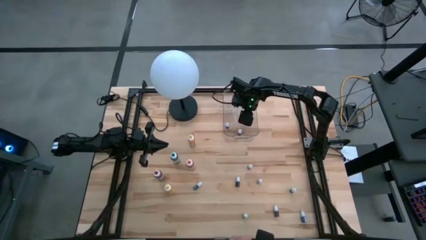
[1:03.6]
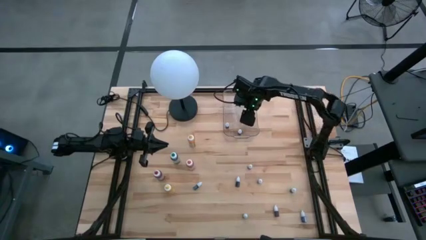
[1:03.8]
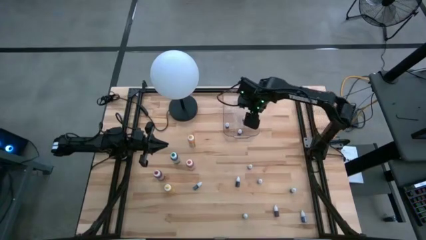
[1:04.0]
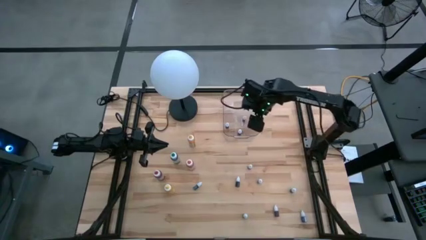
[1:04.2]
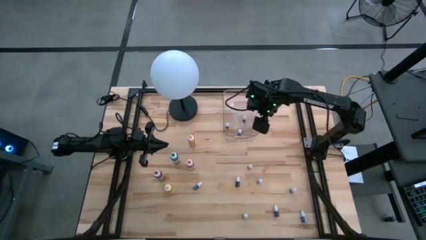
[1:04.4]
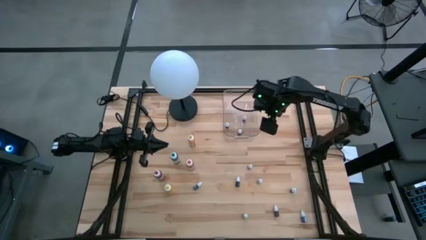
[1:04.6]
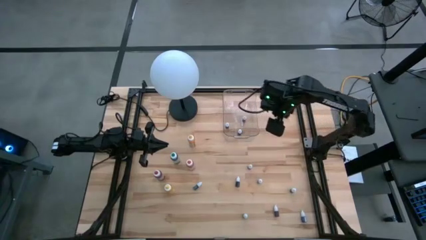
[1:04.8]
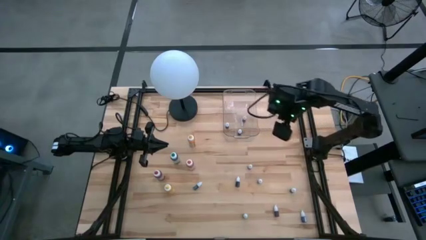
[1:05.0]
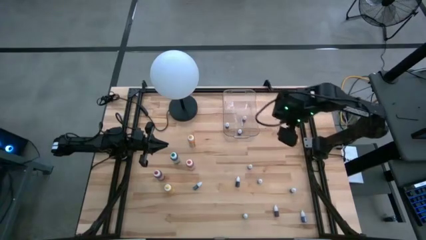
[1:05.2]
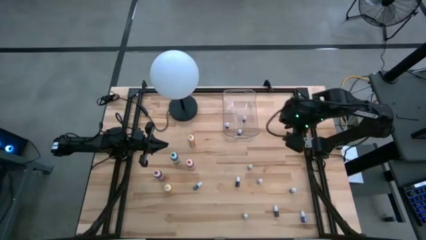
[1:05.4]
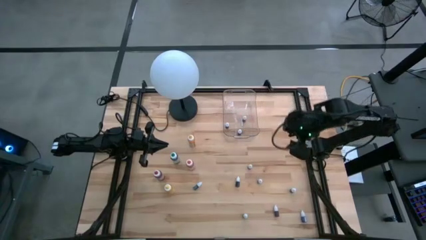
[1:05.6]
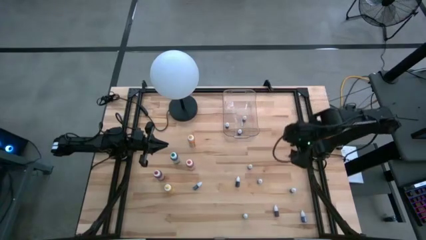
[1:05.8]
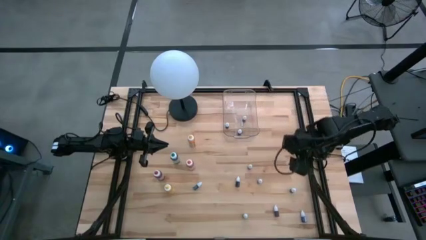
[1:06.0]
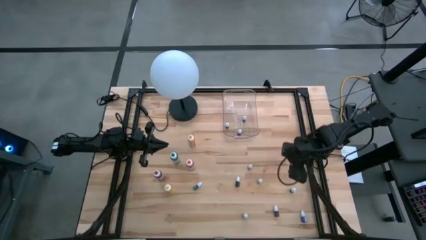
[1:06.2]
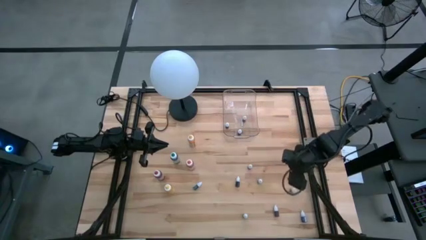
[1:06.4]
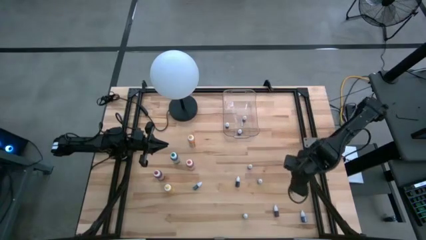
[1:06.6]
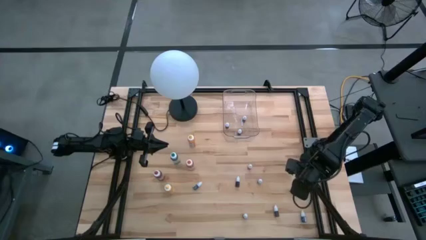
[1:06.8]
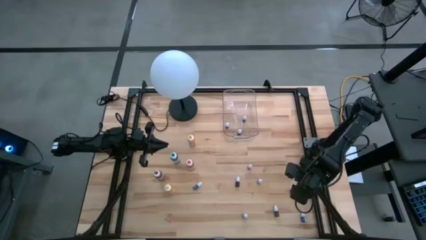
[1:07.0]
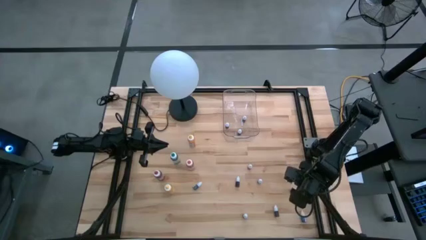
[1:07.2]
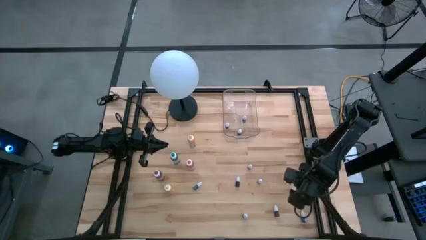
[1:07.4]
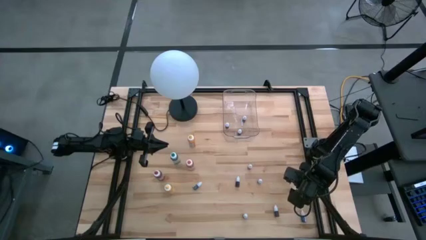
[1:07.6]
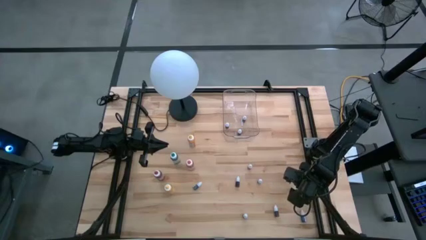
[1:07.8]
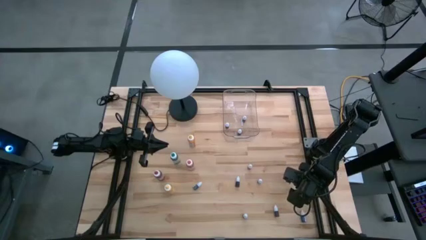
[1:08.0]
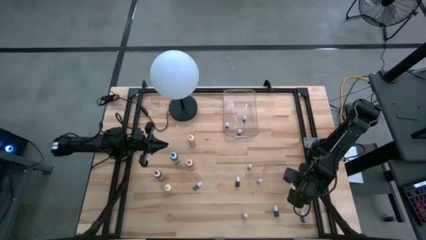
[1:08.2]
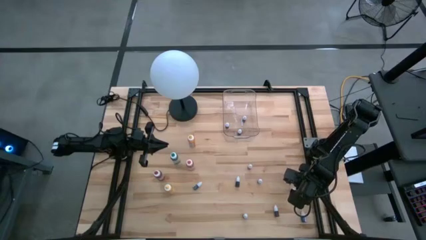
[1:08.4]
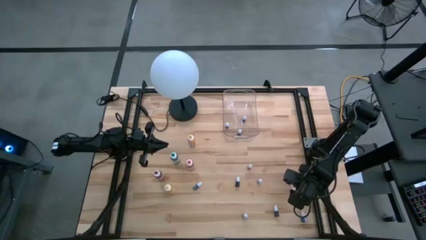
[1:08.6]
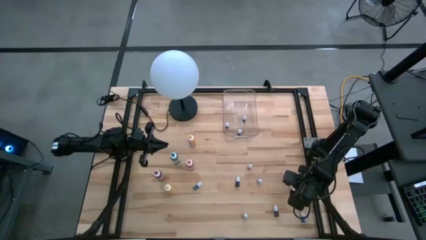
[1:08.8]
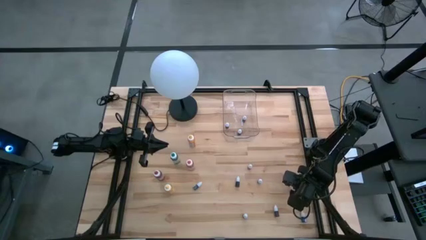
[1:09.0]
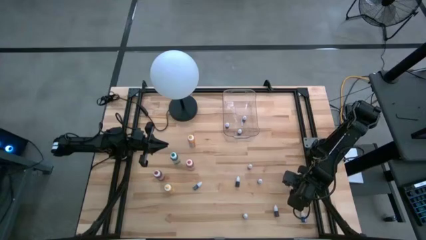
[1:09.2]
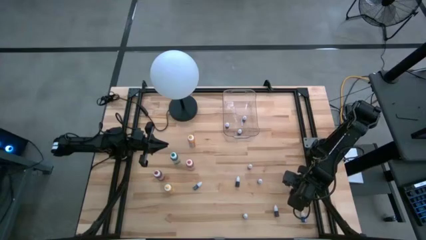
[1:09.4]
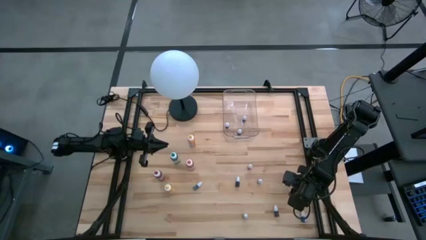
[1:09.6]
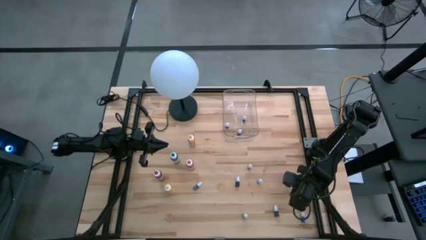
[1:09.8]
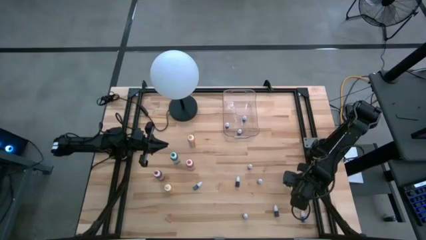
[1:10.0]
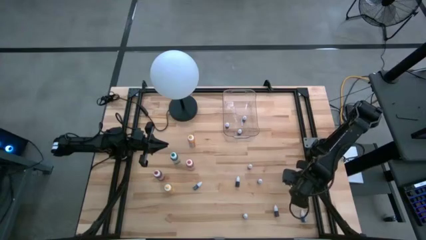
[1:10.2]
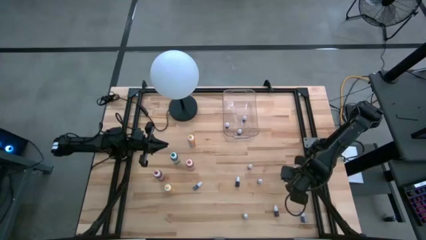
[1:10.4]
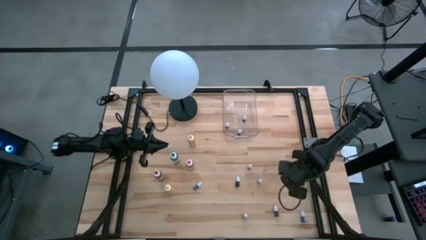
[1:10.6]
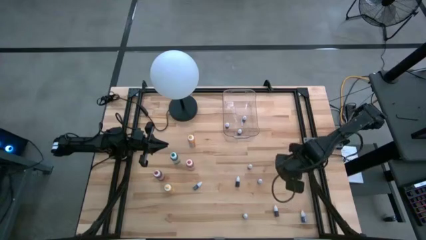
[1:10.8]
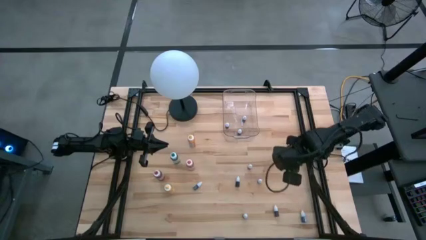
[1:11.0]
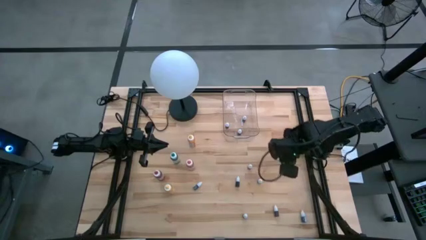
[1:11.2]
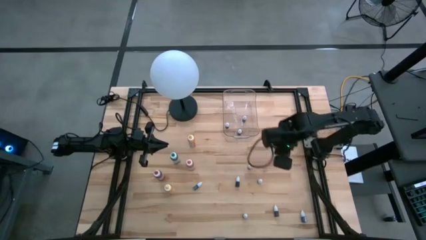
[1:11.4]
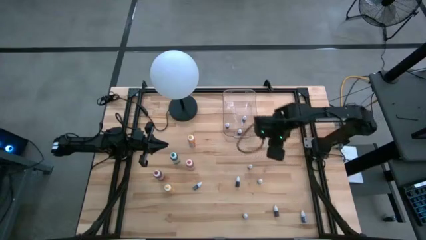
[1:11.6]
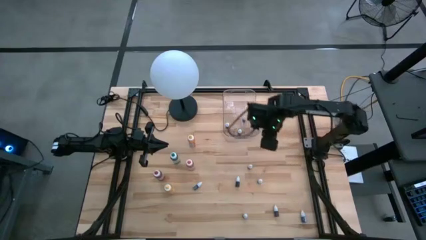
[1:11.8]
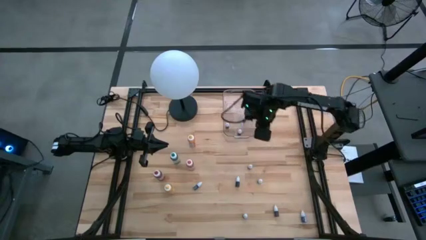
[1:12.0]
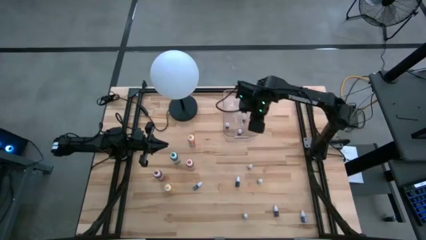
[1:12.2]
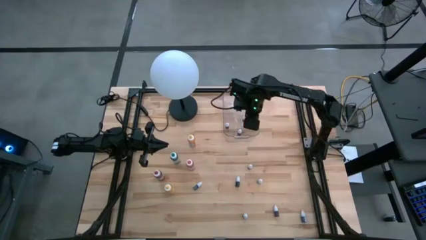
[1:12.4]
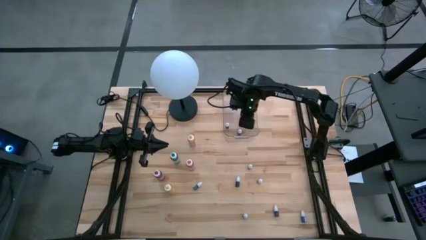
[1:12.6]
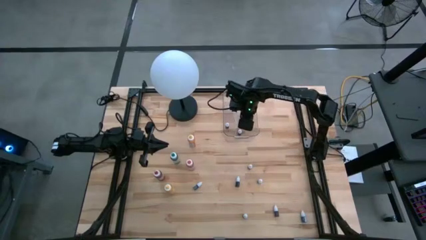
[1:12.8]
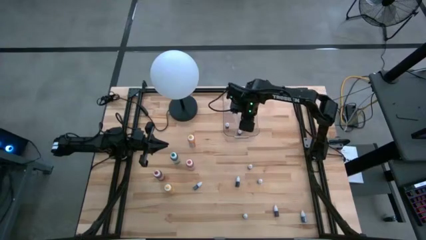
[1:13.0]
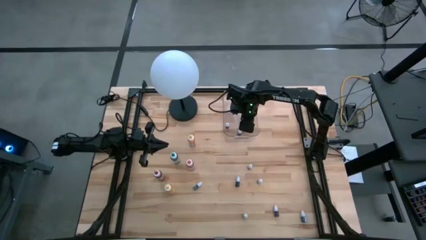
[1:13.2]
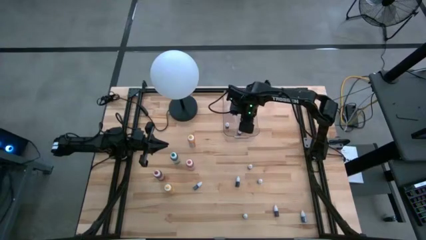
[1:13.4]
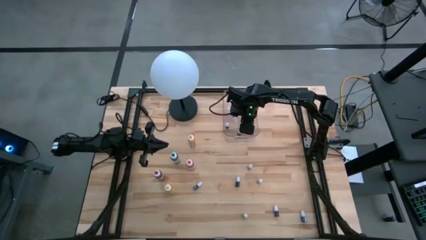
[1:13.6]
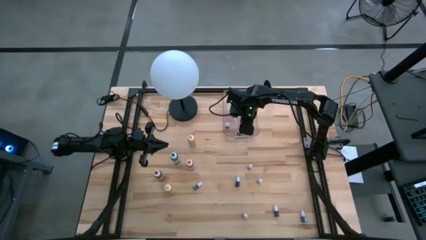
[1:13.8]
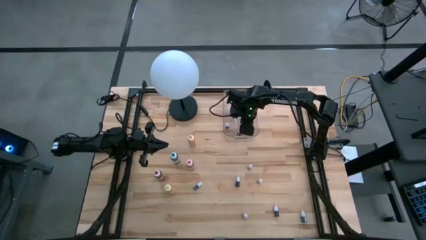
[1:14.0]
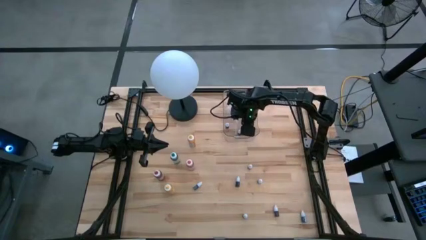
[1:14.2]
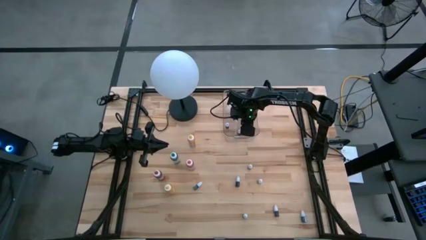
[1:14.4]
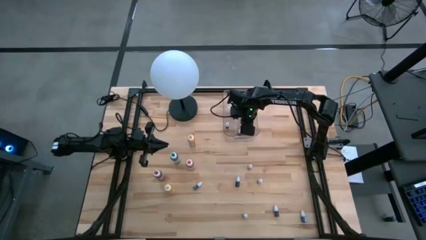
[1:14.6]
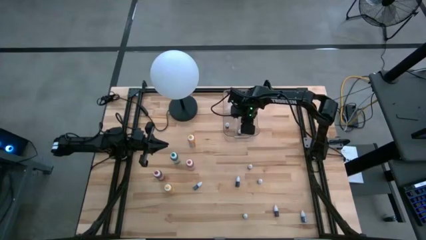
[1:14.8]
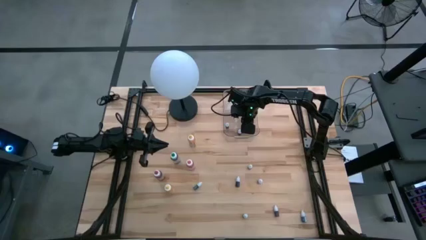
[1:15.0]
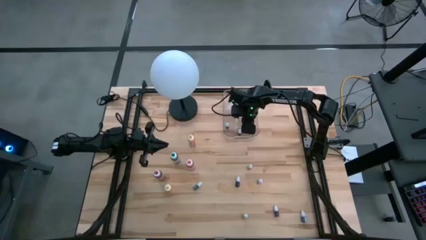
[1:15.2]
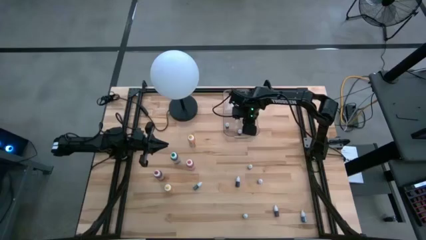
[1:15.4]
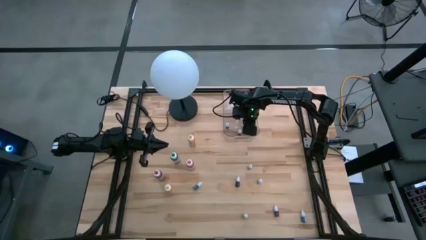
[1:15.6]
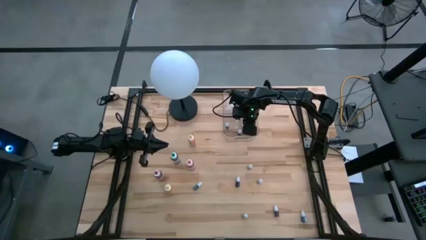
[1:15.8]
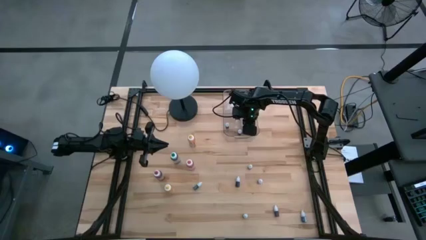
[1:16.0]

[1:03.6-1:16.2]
Task: Pick & Place food coloring
Put the small black food coloring bottle into the transparent bin

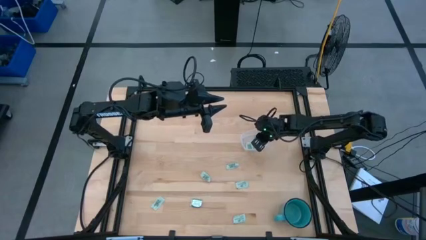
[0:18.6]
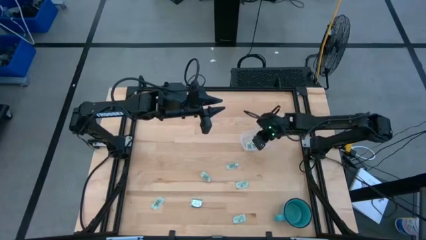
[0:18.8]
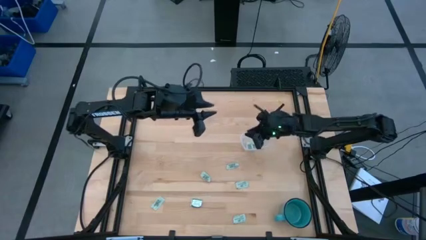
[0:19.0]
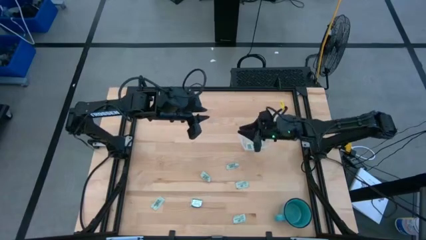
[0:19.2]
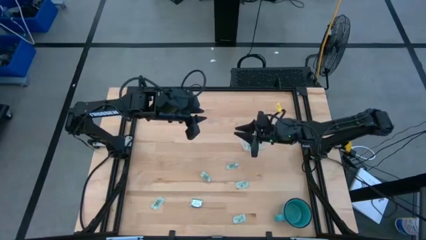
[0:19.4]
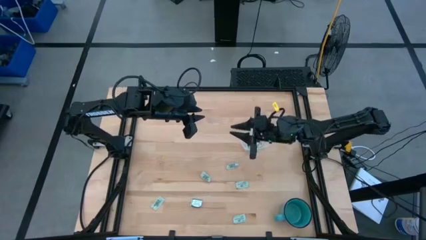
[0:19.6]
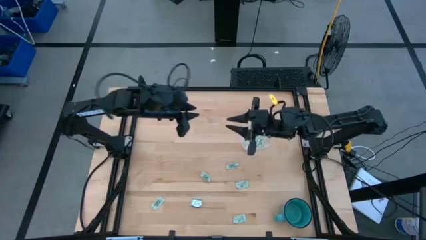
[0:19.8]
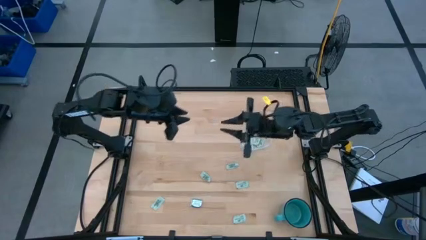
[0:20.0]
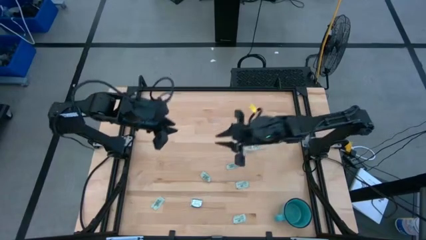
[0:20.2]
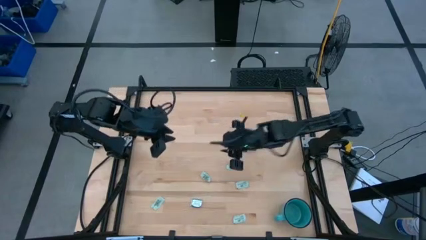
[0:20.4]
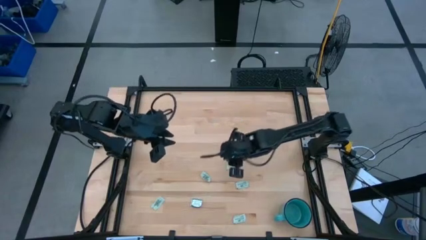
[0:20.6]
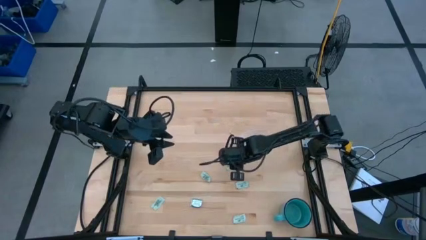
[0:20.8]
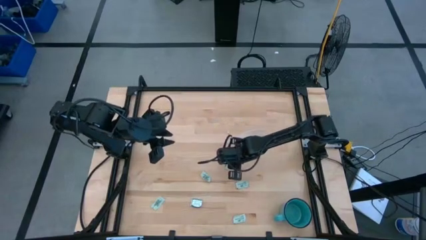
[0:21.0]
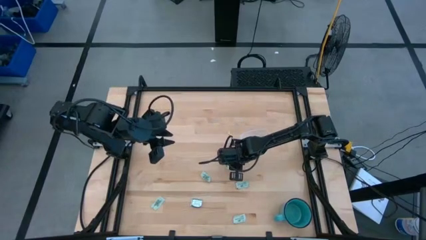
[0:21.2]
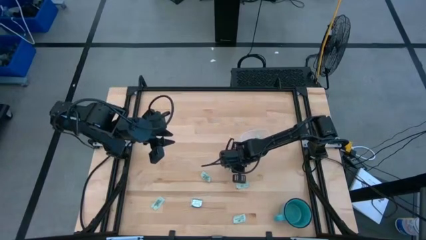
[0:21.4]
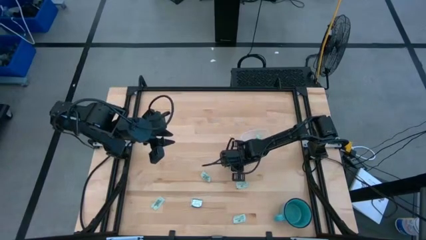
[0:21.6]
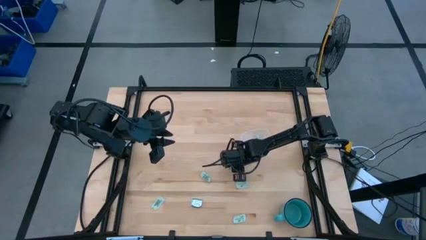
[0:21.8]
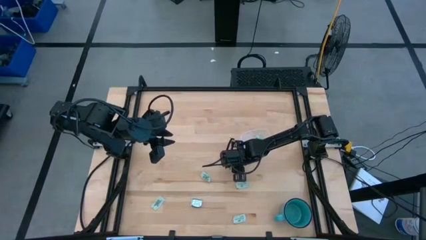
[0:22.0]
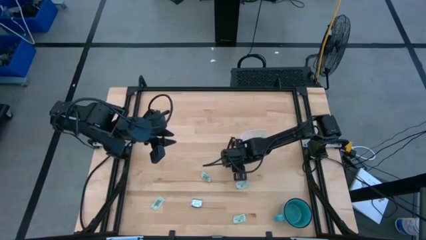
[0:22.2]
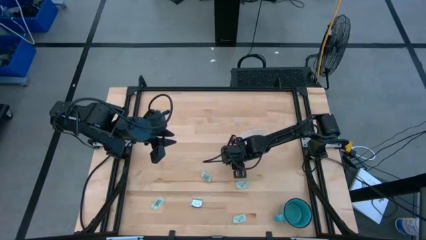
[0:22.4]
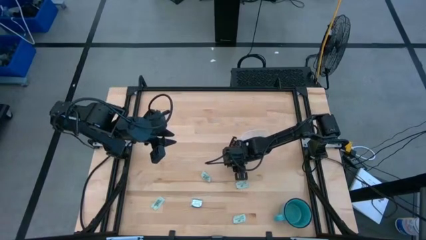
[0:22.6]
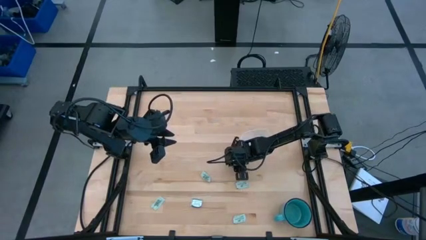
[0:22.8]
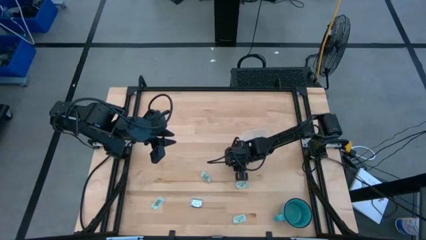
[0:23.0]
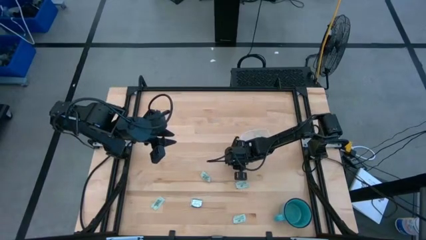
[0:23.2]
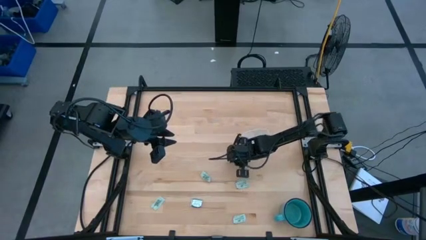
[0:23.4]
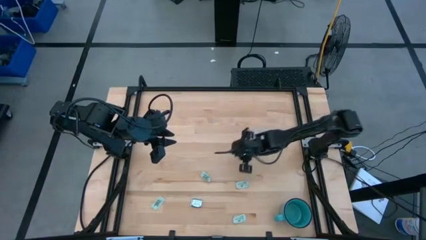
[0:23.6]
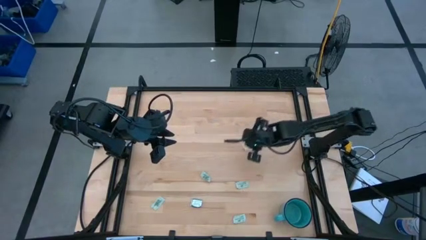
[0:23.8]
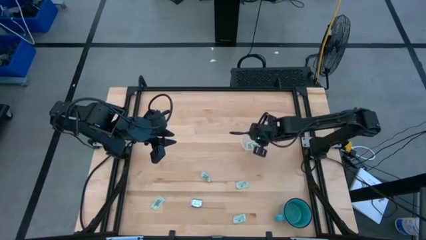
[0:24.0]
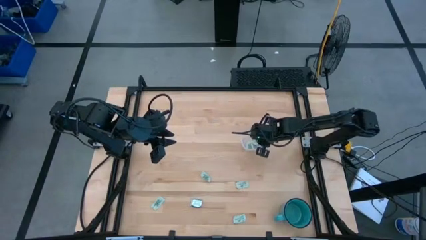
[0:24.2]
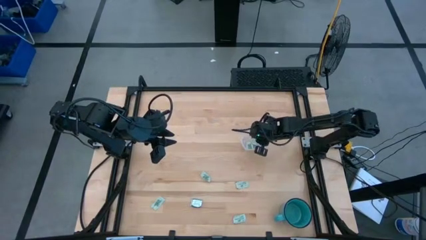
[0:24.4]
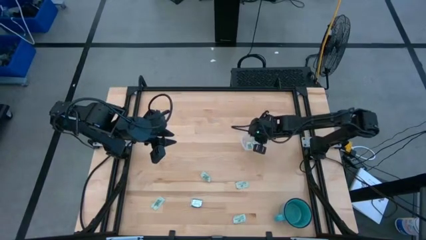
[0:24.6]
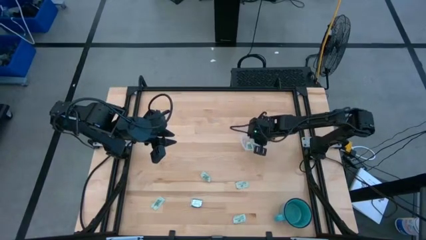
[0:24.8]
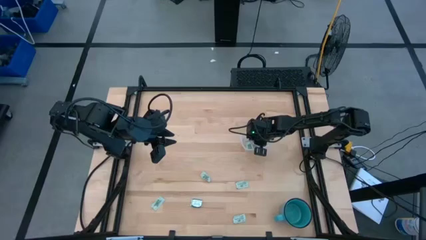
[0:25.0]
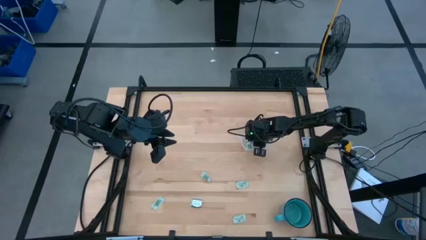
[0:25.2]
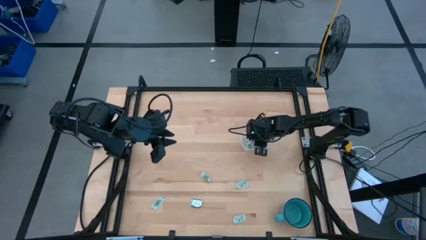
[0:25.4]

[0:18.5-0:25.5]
Task: Pick and place Stevia / Truvia into bins
Put the green stevia packet into the transparent bin
